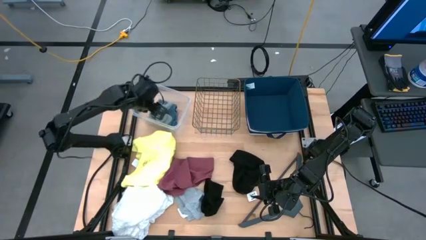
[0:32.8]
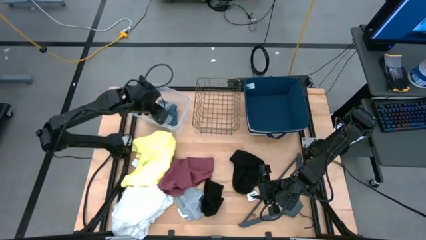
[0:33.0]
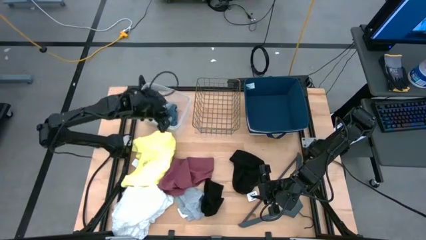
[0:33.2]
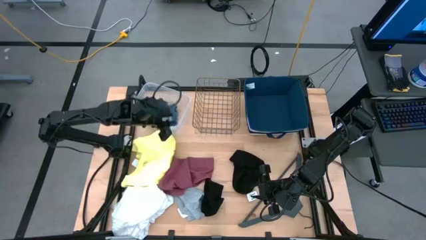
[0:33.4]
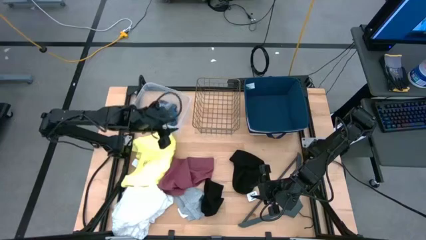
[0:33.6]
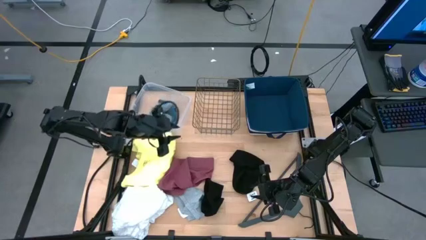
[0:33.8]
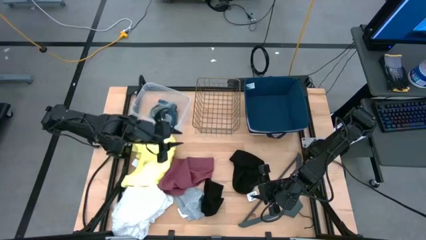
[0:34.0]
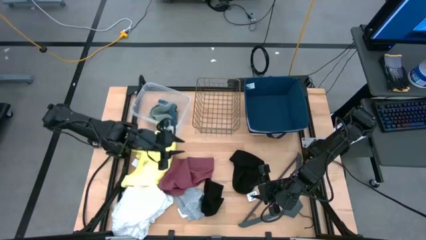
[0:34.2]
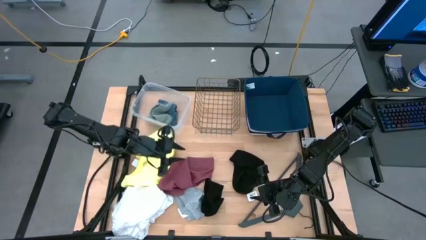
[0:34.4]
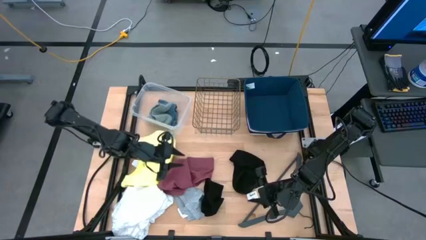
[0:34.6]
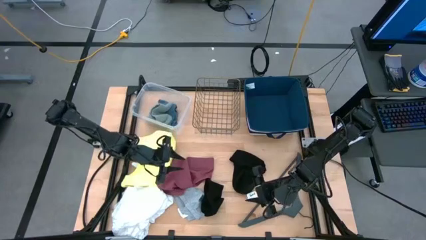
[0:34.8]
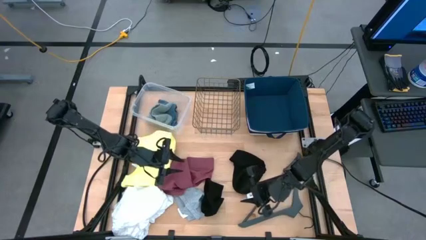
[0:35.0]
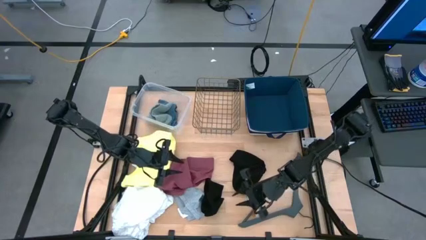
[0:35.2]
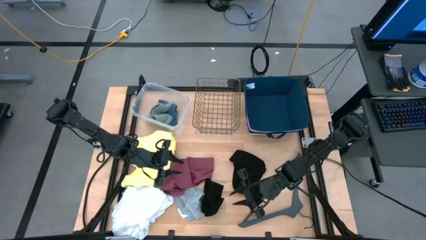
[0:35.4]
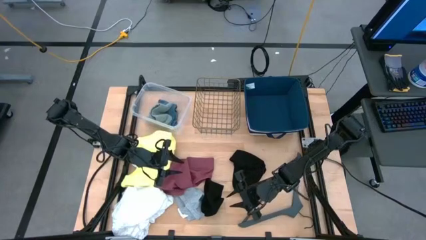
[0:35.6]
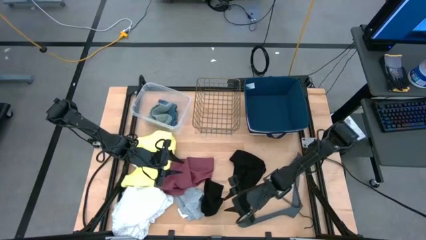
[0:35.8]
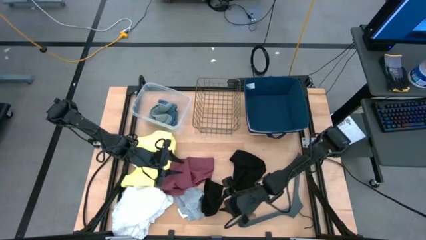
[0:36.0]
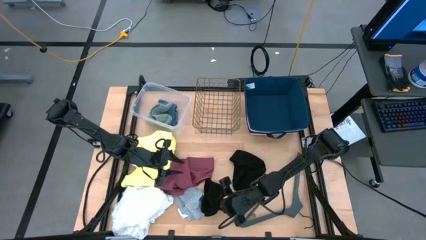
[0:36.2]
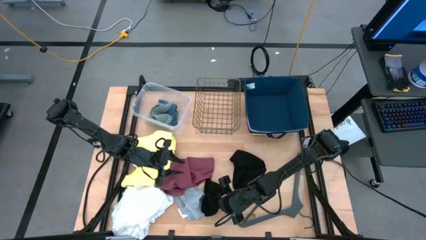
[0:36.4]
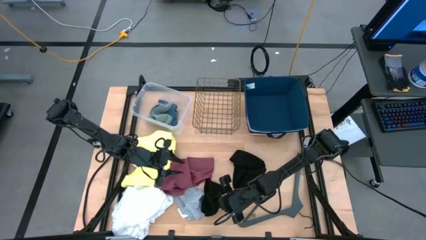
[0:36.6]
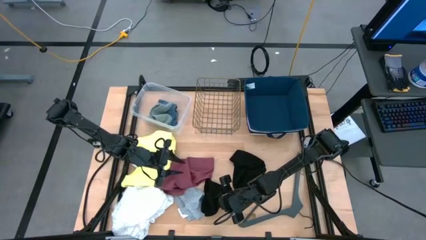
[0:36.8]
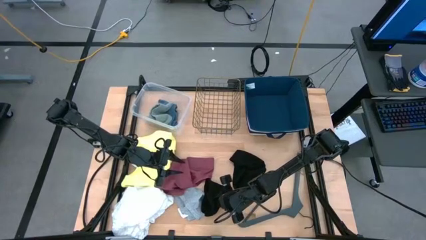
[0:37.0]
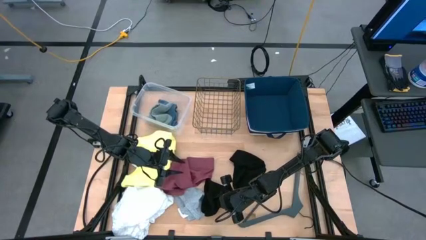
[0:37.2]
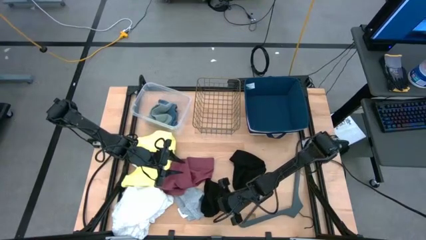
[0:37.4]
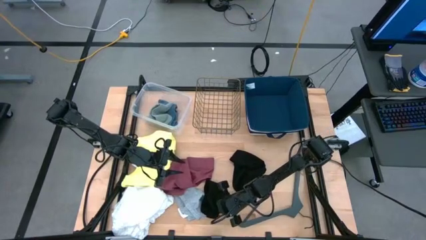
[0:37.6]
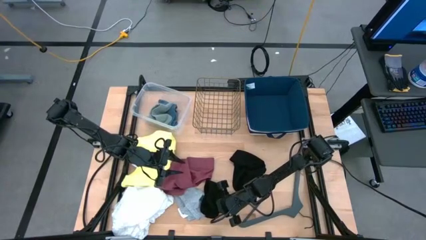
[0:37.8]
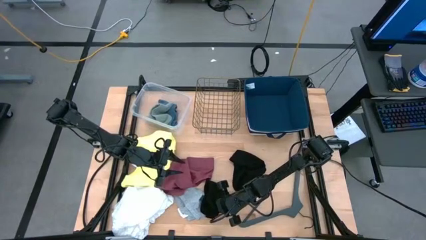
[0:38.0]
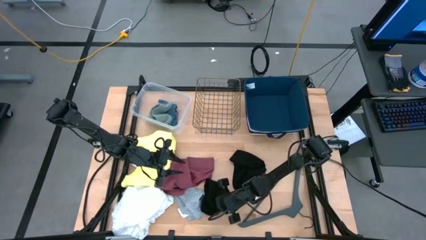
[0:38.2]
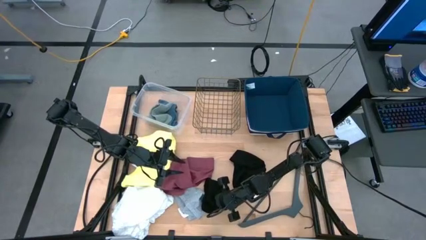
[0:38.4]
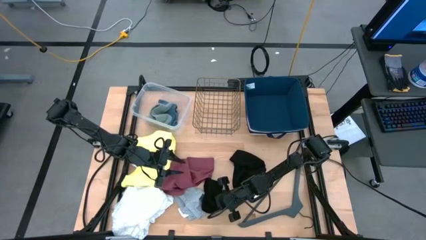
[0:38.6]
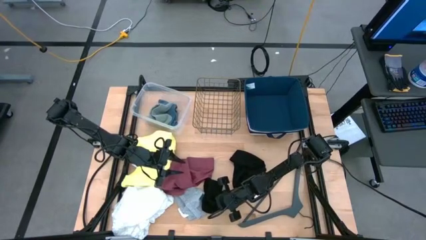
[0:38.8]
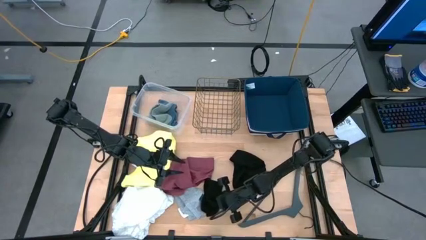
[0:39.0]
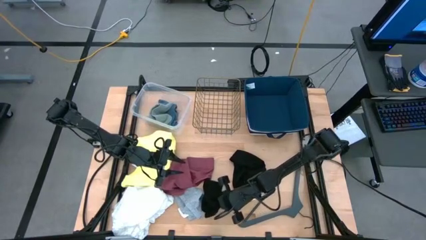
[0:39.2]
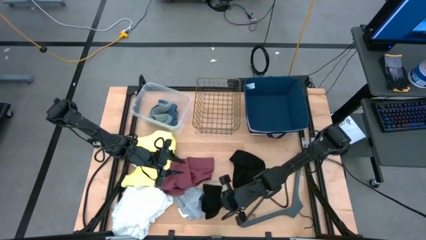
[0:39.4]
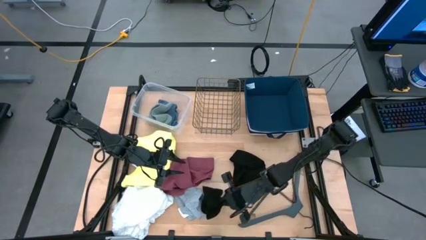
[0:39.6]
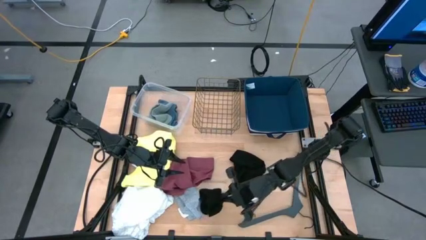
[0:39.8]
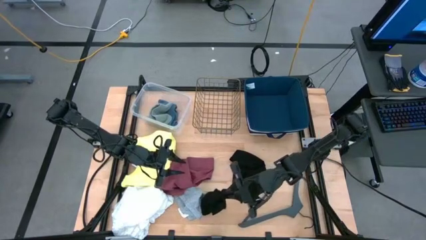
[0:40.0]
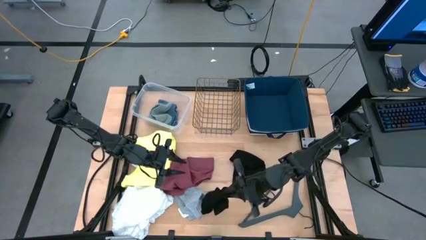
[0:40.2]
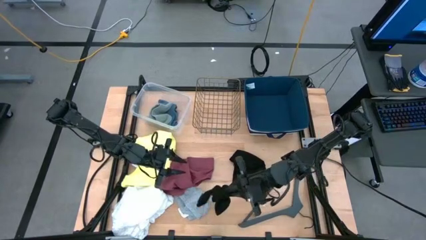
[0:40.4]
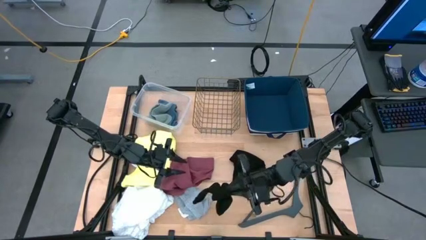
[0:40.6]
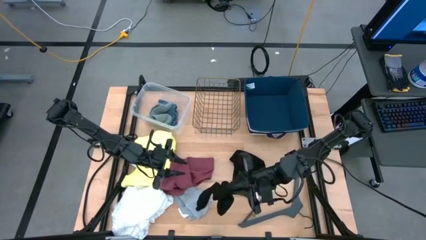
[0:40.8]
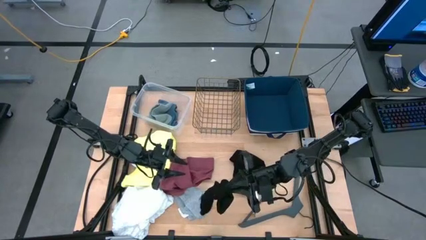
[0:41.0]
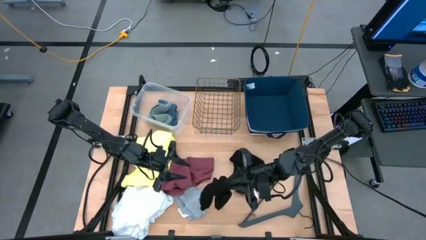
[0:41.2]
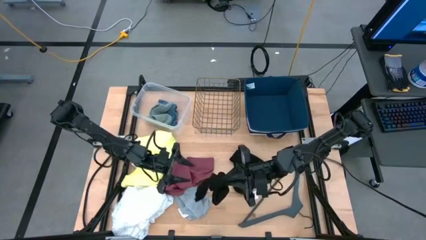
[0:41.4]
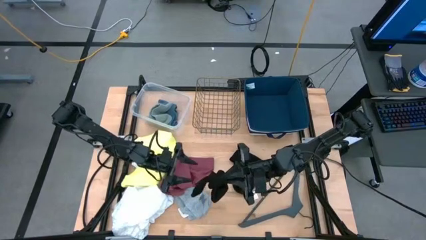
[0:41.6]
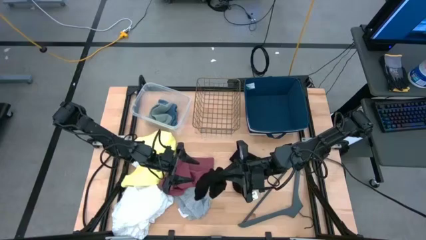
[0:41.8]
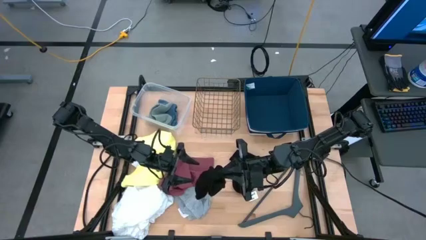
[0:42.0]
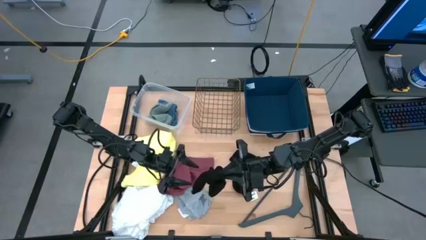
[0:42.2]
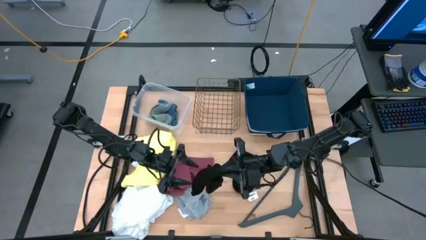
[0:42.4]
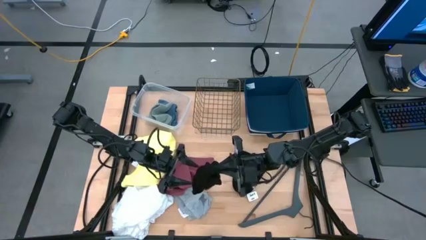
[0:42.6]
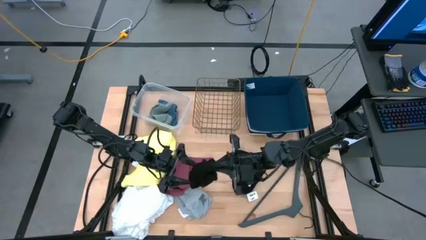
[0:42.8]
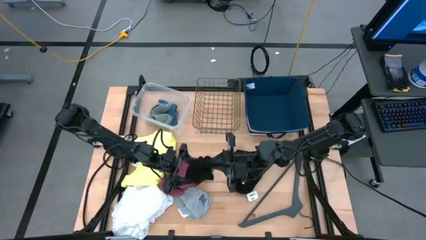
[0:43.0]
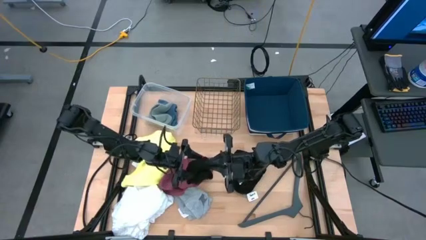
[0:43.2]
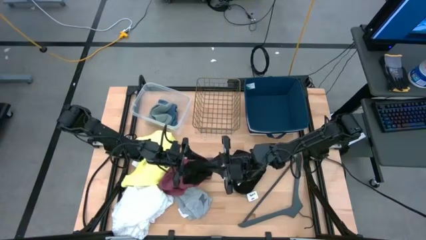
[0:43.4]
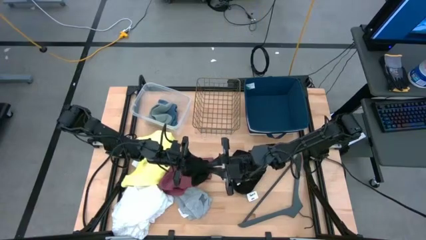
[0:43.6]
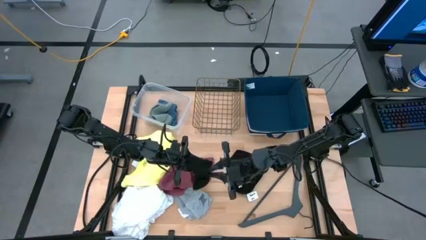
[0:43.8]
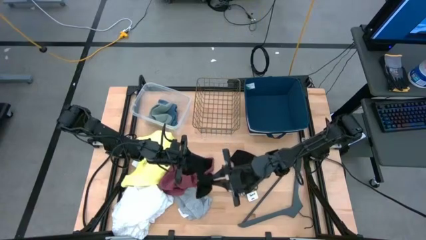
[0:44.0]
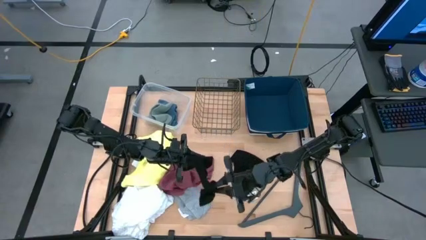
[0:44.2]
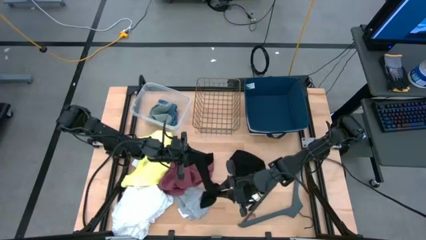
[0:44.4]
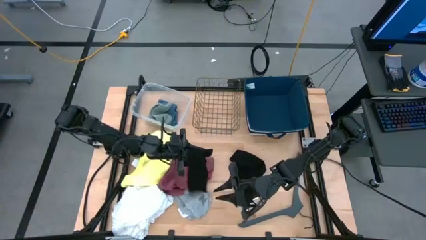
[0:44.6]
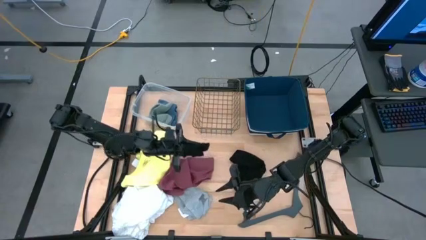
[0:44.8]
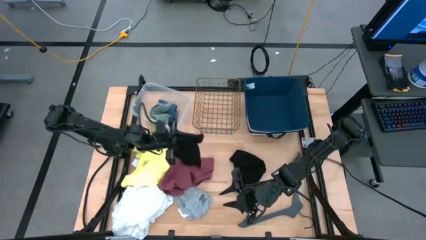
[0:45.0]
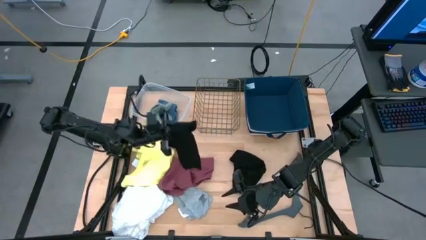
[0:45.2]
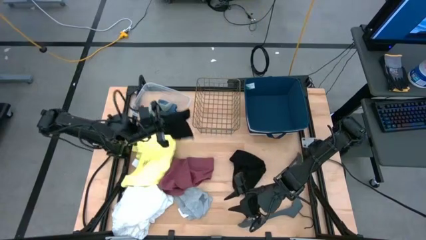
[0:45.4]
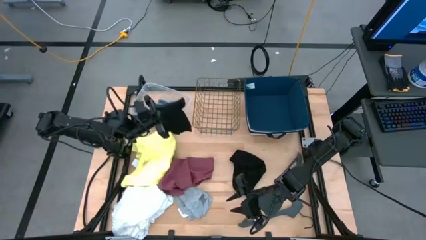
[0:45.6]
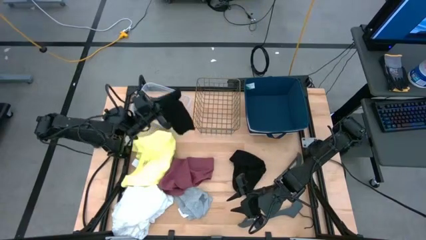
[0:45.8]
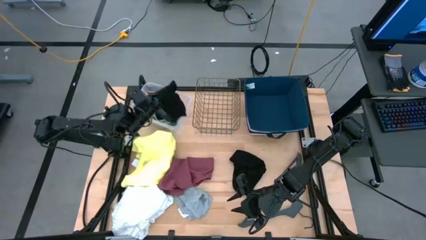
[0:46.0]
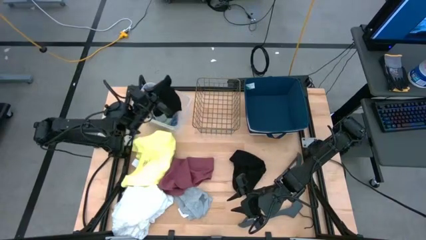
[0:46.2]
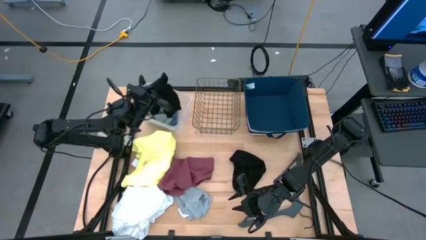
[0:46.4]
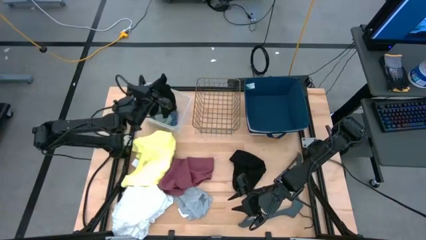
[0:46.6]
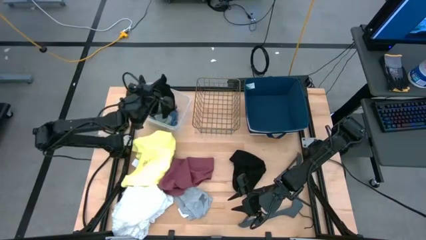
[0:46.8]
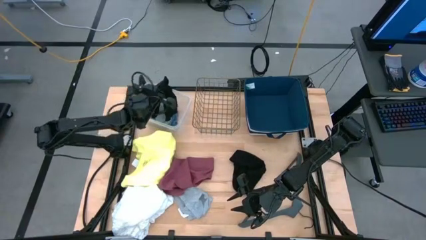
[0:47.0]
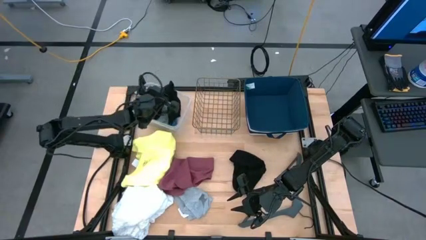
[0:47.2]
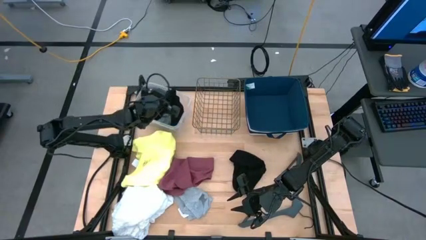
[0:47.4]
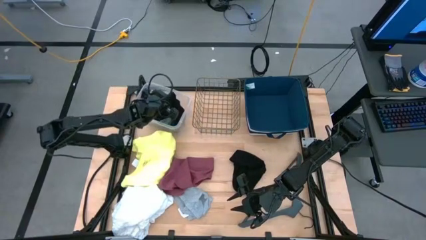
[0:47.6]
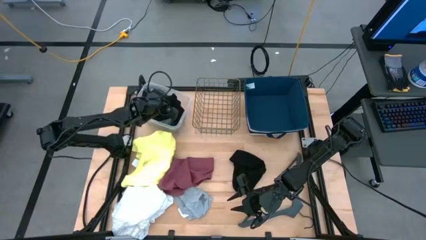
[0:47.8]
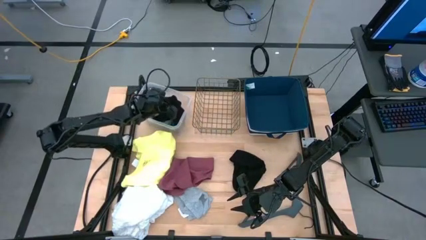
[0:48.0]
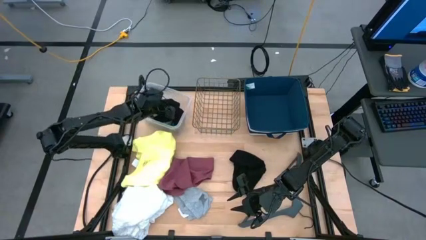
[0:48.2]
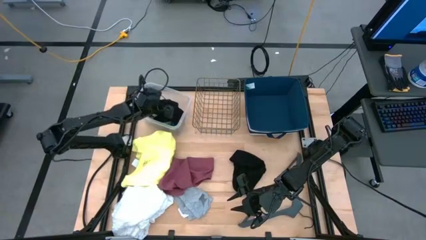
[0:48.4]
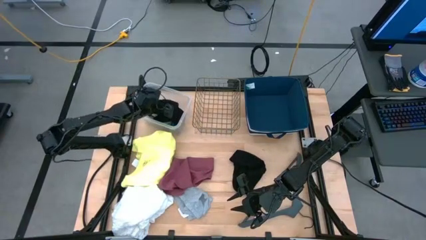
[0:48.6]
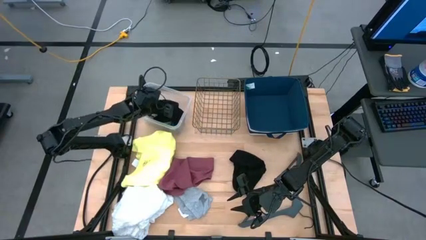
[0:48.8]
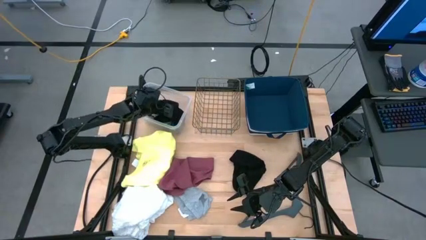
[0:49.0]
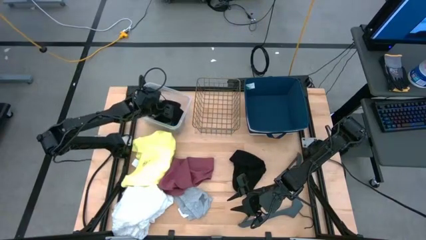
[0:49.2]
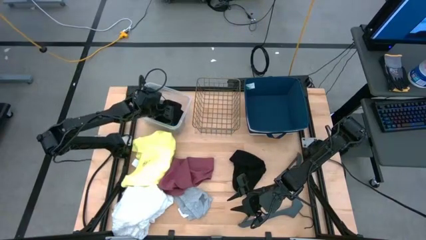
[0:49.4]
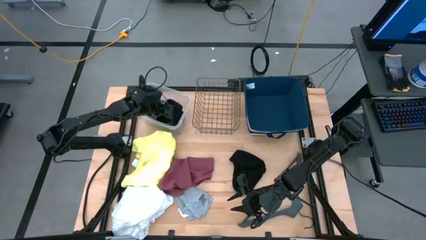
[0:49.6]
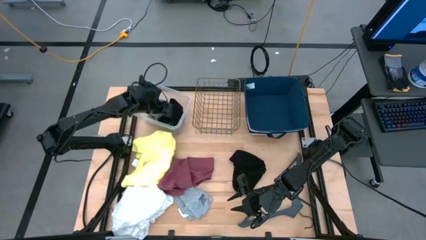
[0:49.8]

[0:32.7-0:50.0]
Task: Pick & Place Cloths
Put the black sock into the transparent bin
